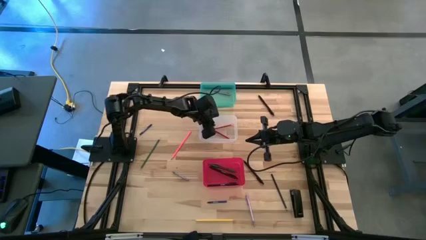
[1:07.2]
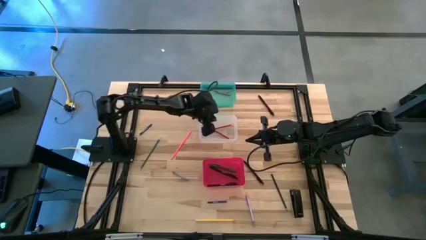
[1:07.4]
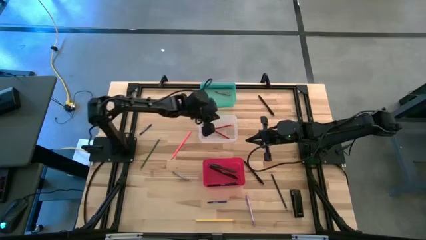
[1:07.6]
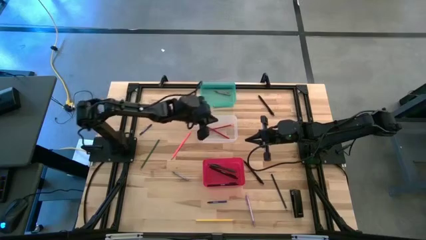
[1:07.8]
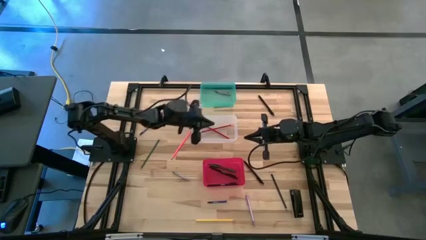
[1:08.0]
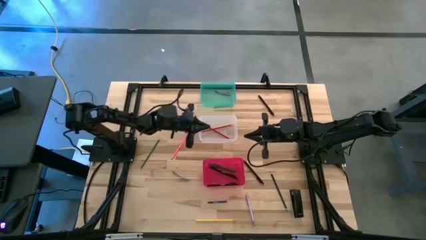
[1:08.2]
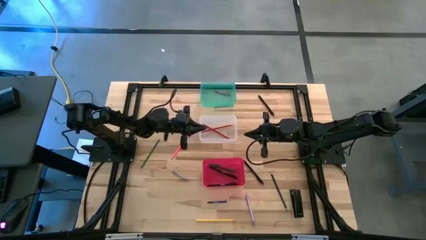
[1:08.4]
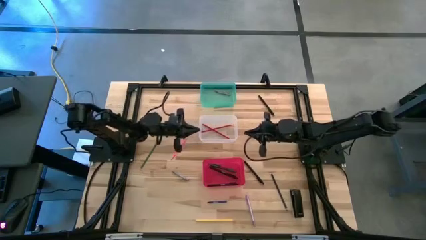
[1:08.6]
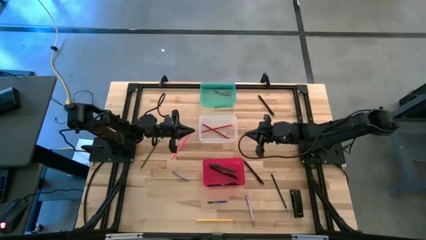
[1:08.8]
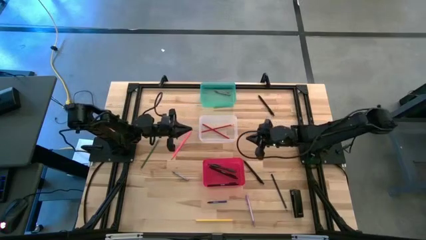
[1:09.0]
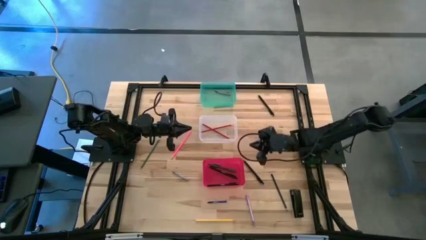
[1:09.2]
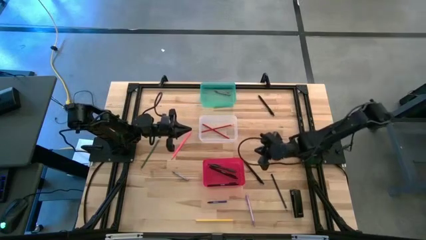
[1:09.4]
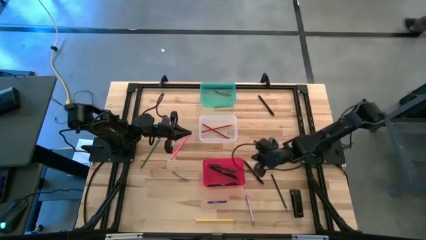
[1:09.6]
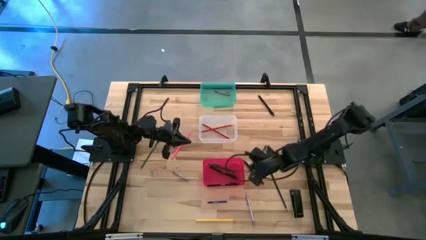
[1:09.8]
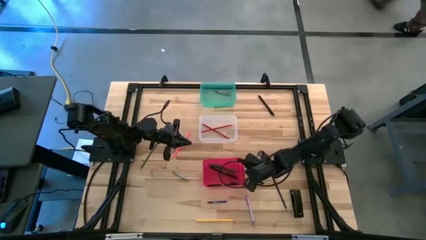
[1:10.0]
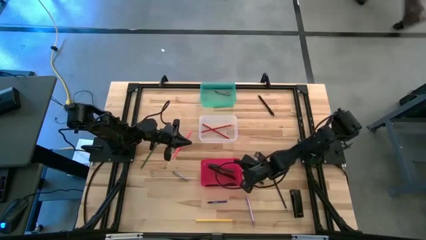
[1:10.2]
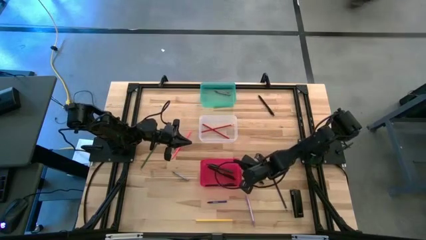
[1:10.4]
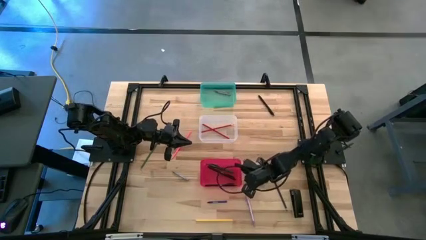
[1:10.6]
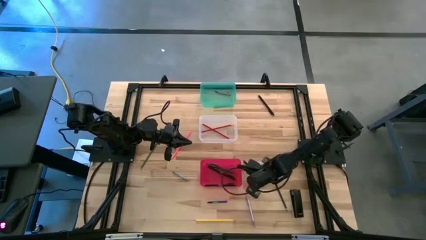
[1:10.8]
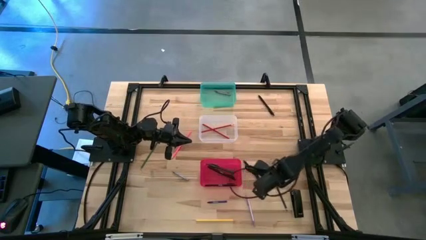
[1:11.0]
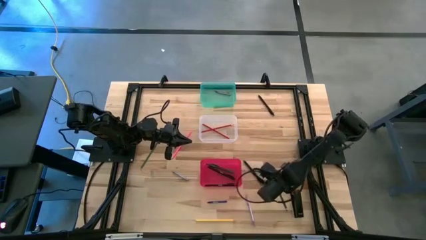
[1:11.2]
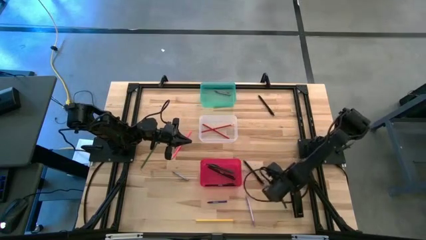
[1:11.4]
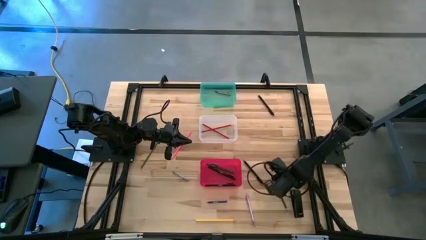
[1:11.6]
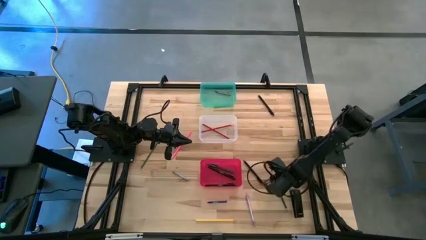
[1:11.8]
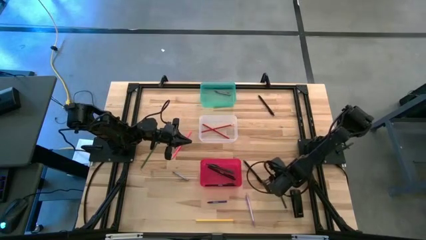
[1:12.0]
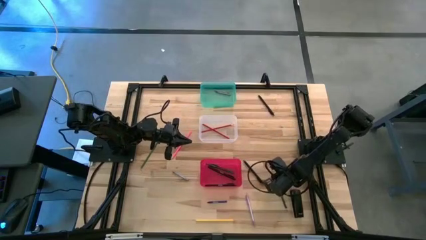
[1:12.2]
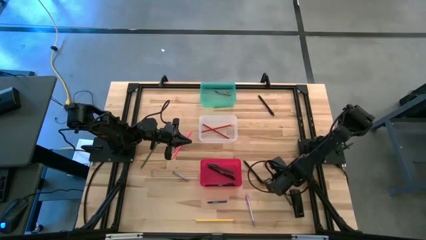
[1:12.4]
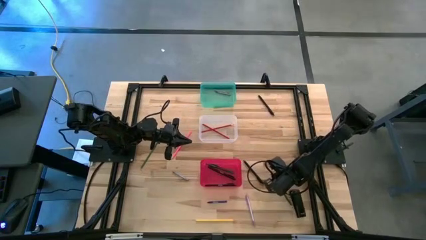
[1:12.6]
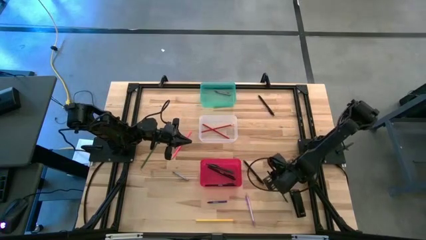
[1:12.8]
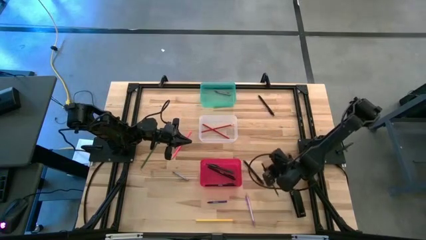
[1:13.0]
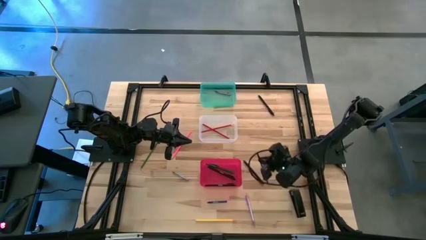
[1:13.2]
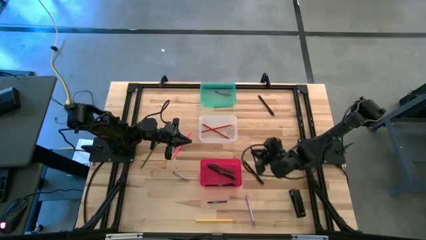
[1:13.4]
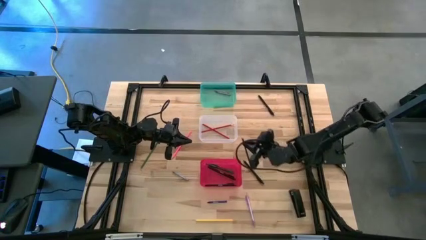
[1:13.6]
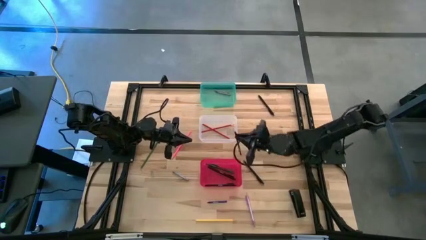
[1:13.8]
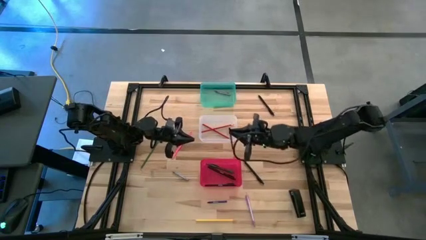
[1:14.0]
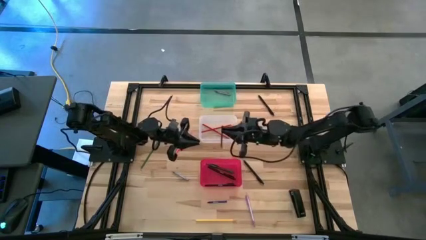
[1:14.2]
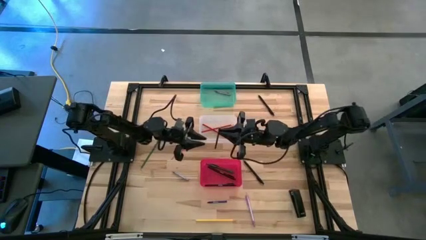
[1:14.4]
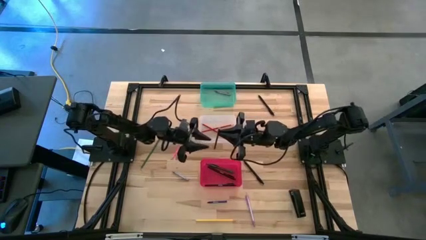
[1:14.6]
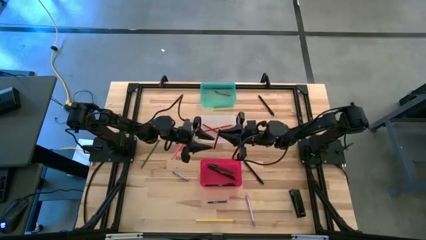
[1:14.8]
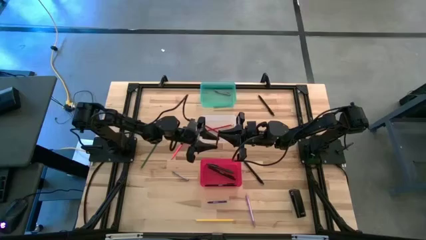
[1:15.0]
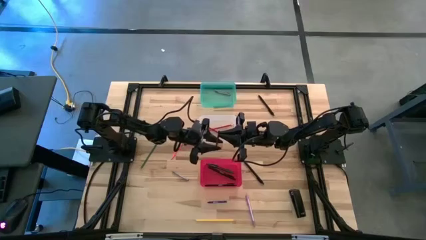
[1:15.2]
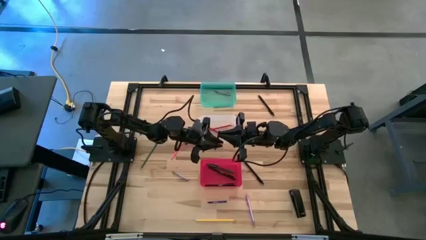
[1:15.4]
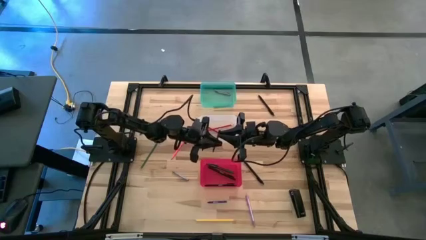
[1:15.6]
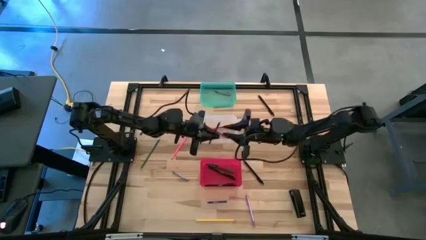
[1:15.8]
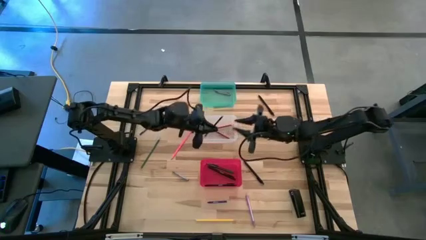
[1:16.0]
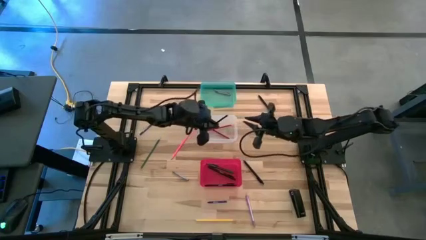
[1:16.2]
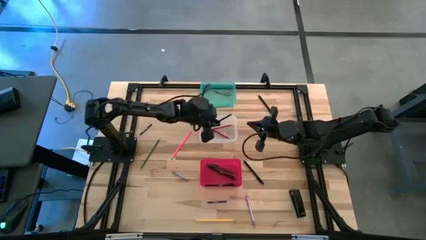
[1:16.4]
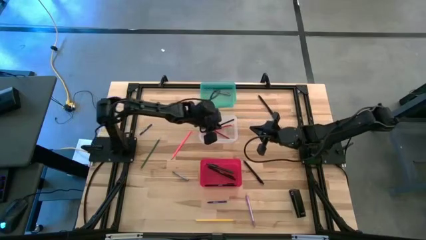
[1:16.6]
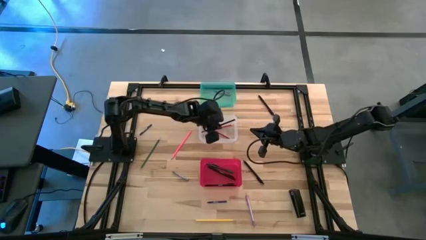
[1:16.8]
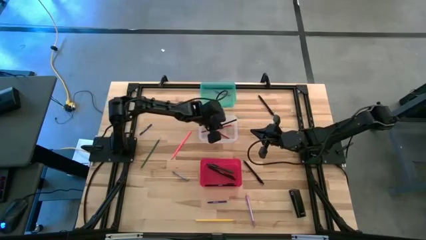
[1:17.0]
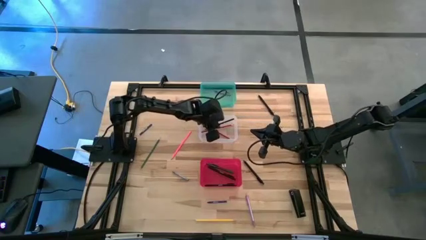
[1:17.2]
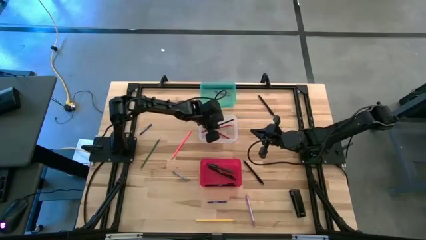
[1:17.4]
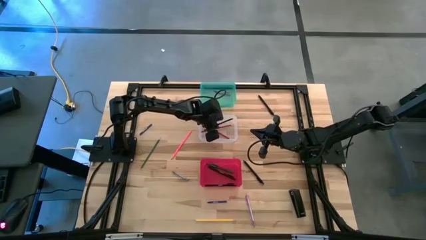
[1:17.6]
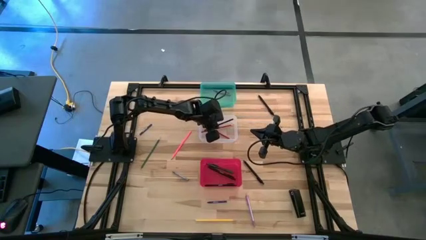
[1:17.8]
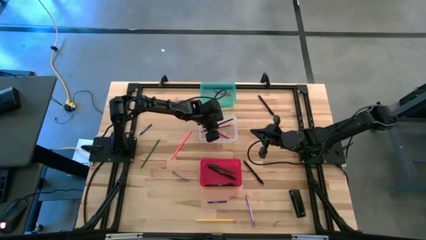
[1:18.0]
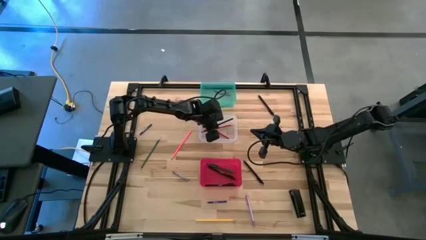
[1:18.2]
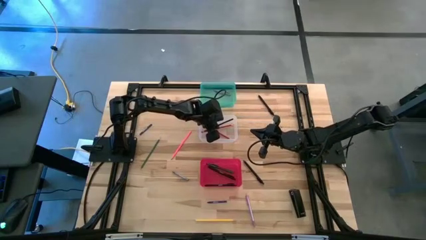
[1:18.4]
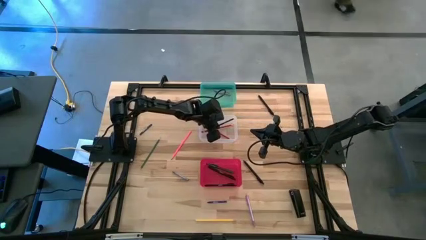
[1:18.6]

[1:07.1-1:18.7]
Task: Sort crayons/erasers/pens/pencils in bins
Put the blue pencil into the transparent bin

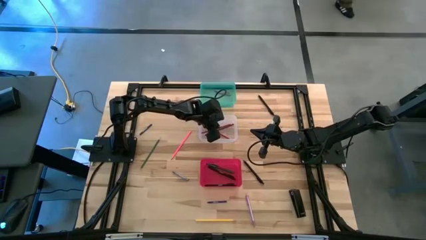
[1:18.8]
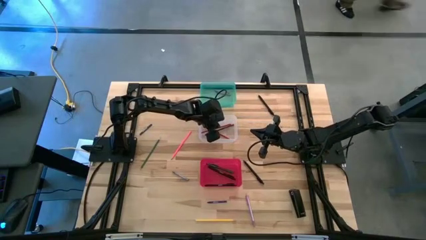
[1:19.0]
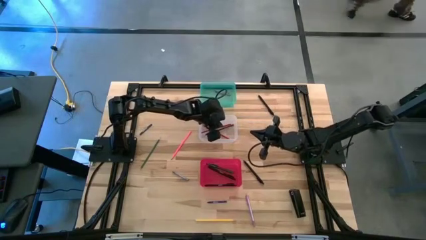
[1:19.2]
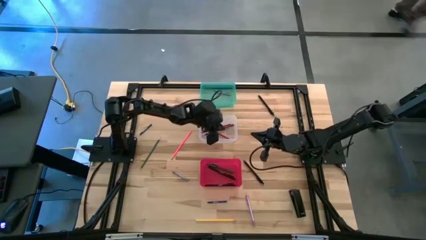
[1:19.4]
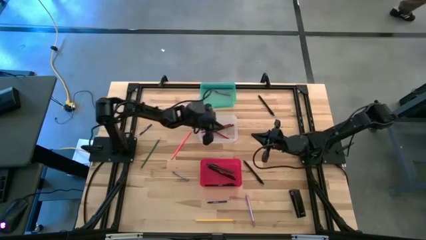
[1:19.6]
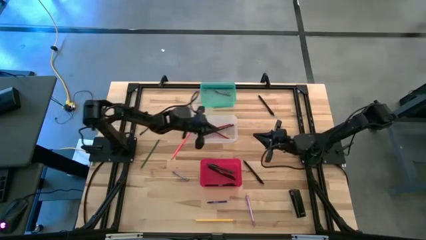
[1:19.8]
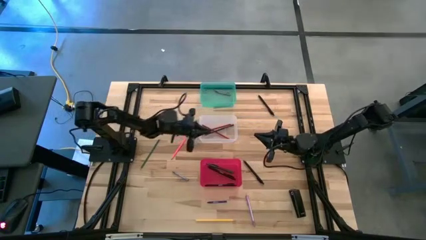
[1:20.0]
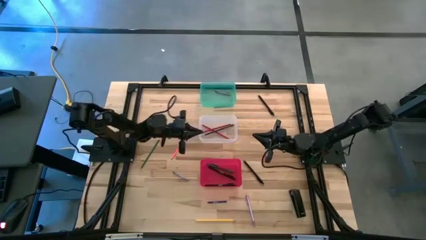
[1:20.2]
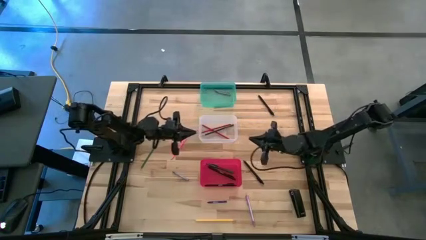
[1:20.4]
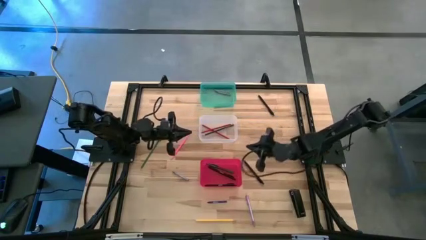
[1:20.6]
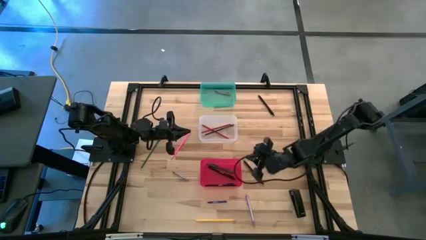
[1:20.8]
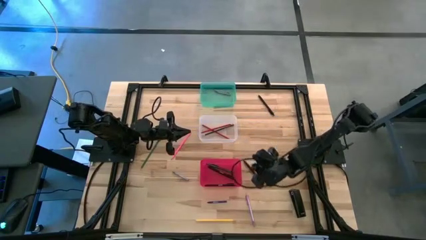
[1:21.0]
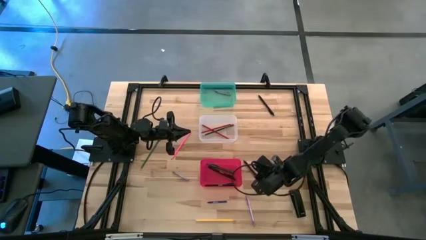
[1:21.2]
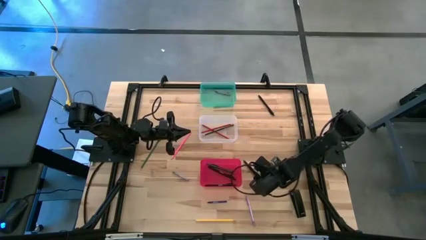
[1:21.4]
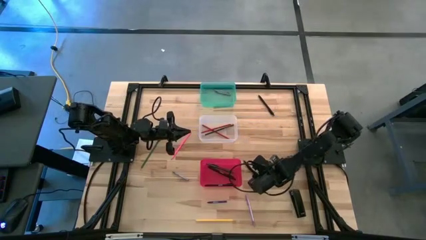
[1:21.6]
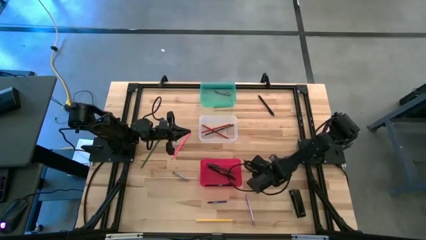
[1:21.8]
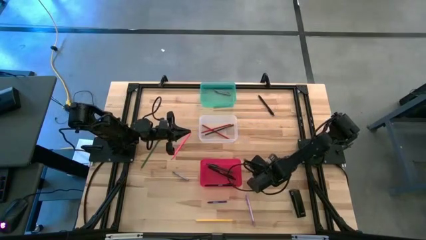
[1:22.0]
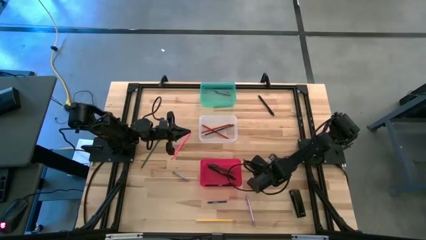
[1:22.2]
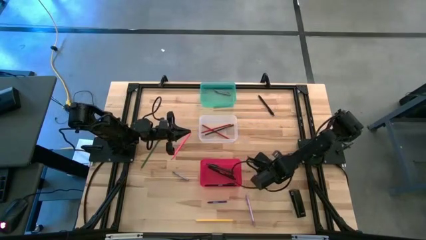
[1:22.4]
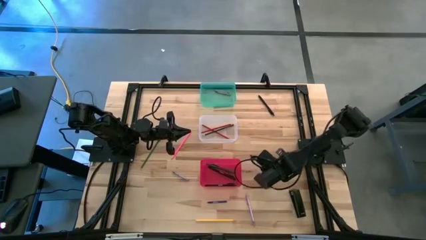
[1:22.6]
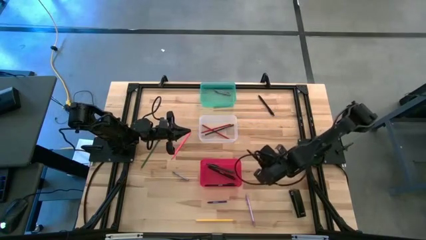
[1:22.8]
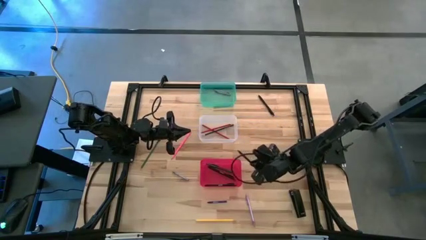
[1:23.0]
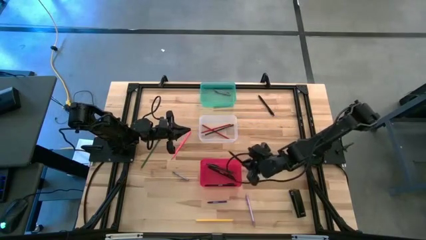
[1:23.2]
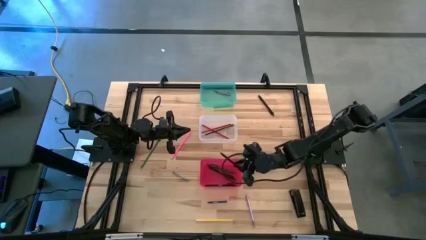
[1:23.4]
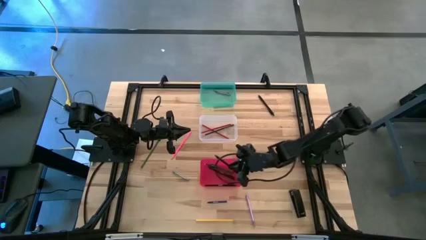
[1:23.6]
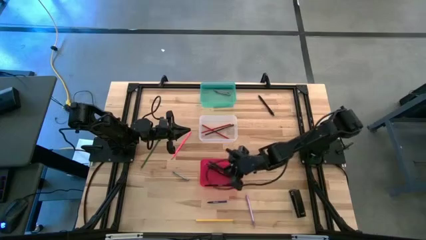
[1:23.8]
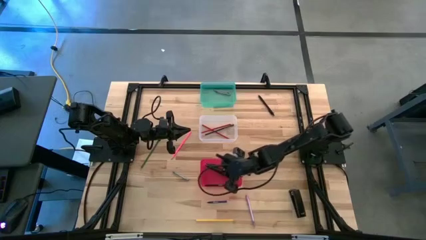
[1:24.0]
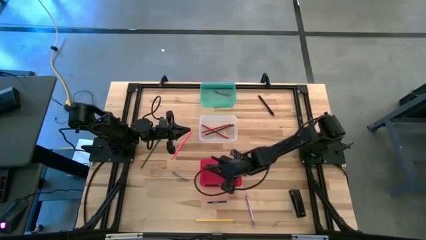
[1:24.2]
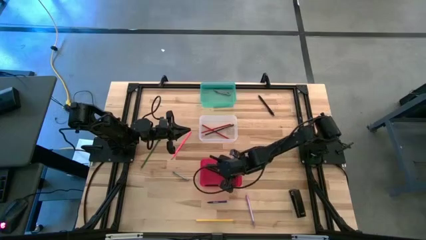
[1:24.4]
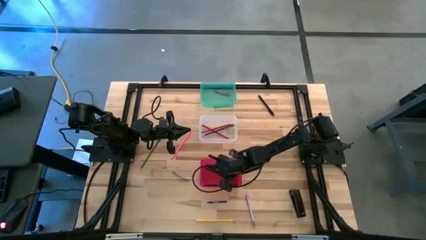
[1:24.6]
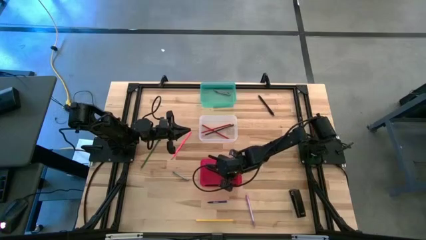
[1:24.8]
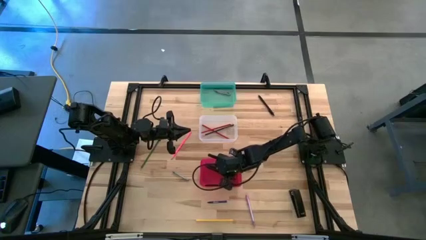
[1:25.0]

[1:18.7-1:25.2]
Put the bottom black pen into the red bin
